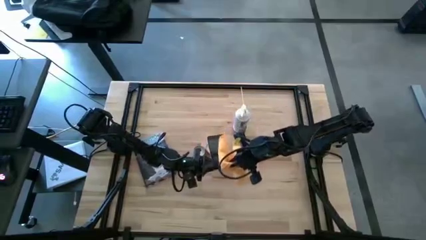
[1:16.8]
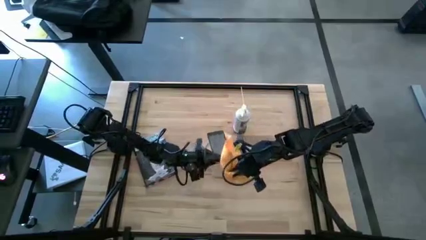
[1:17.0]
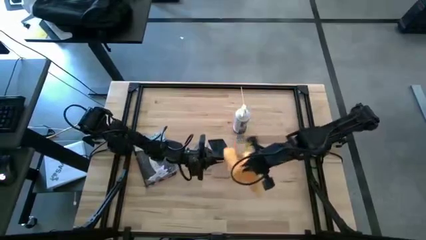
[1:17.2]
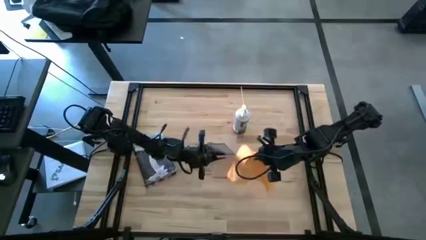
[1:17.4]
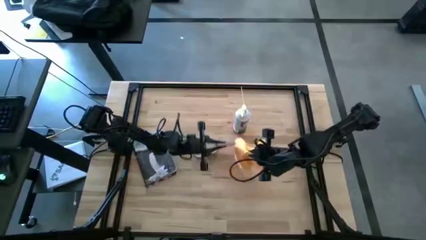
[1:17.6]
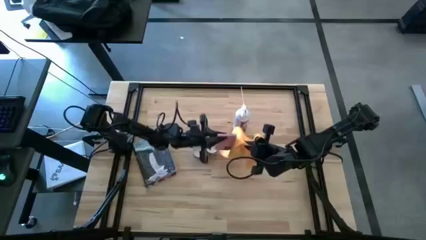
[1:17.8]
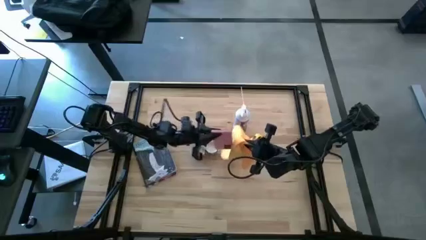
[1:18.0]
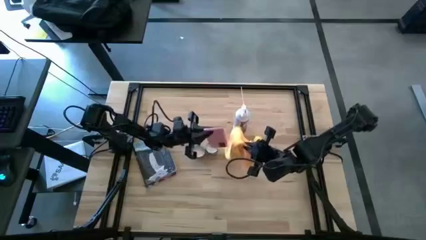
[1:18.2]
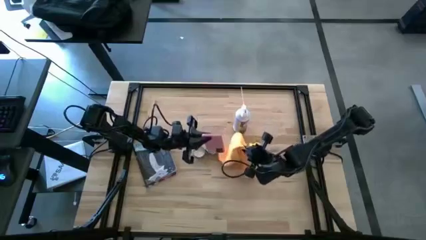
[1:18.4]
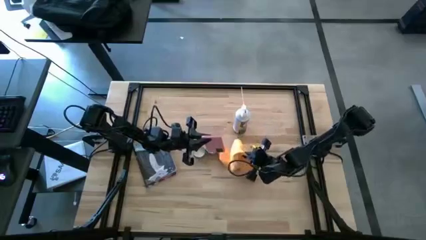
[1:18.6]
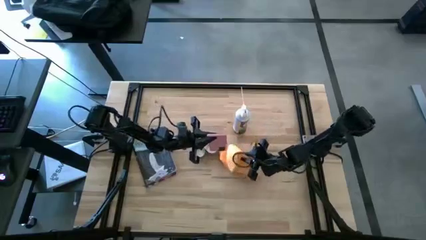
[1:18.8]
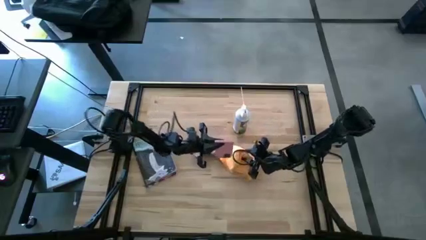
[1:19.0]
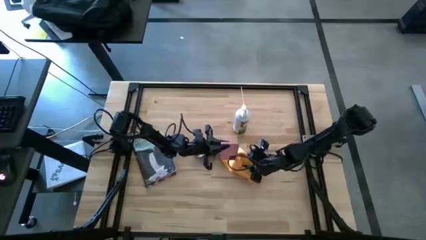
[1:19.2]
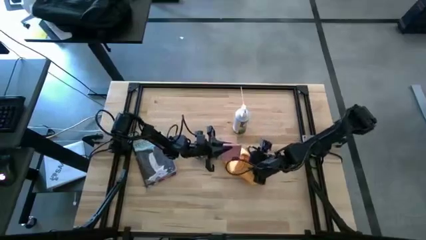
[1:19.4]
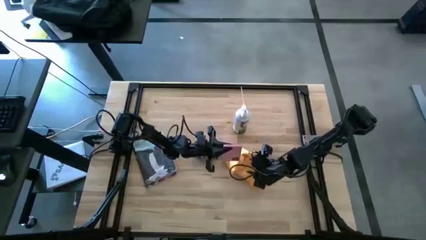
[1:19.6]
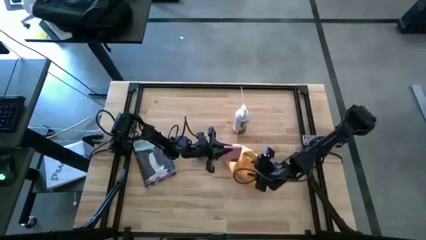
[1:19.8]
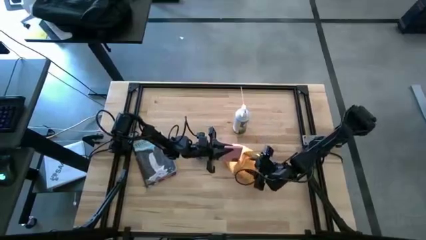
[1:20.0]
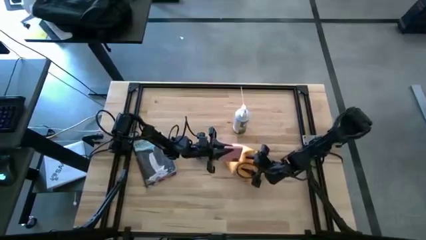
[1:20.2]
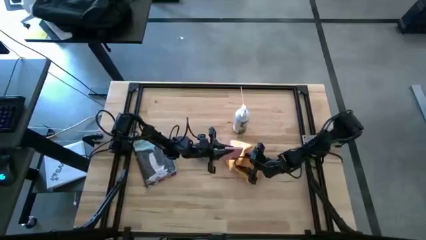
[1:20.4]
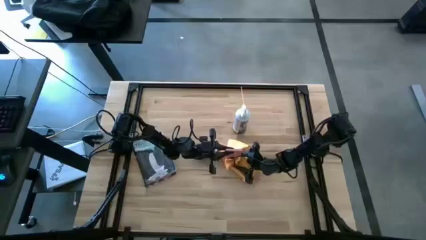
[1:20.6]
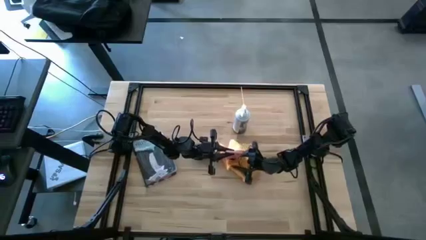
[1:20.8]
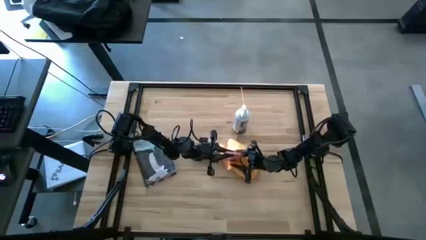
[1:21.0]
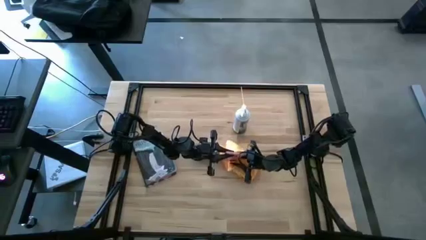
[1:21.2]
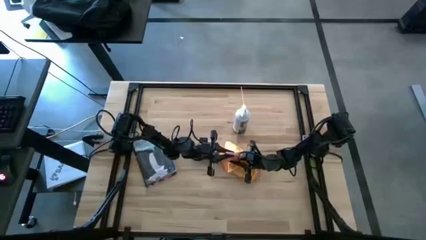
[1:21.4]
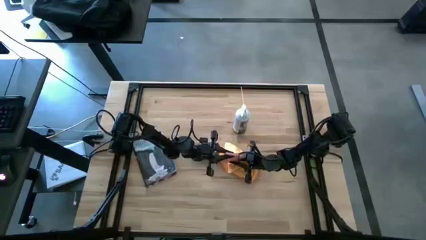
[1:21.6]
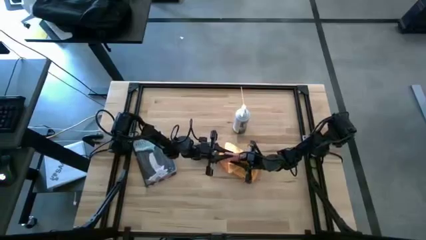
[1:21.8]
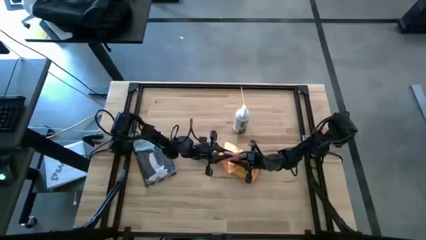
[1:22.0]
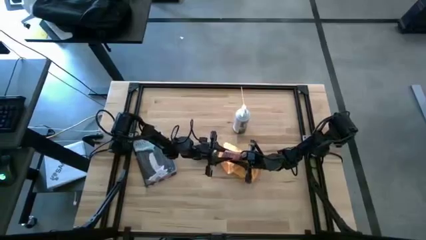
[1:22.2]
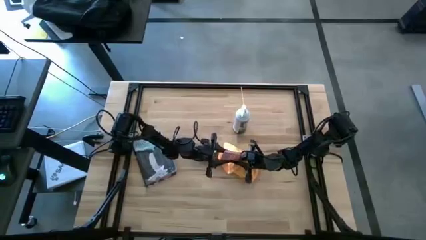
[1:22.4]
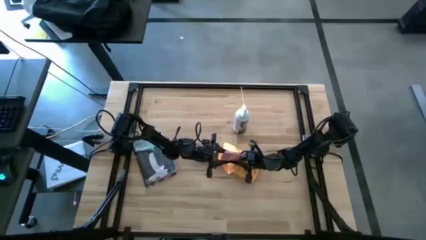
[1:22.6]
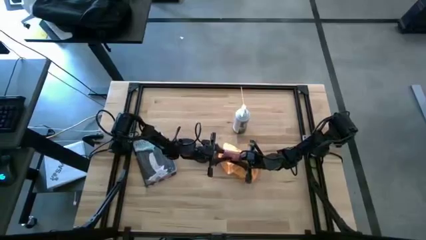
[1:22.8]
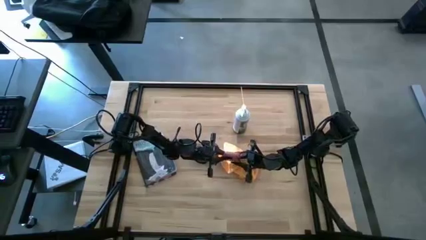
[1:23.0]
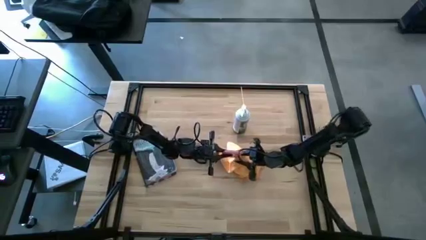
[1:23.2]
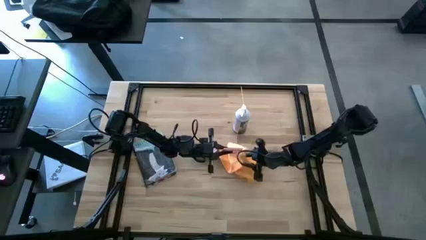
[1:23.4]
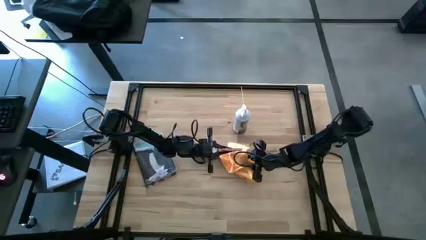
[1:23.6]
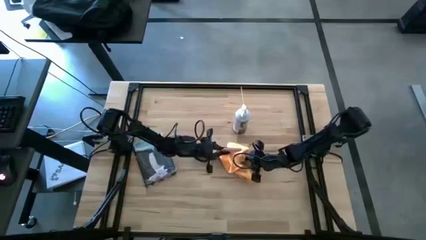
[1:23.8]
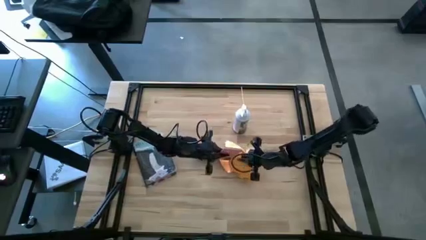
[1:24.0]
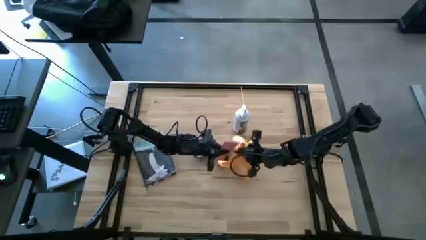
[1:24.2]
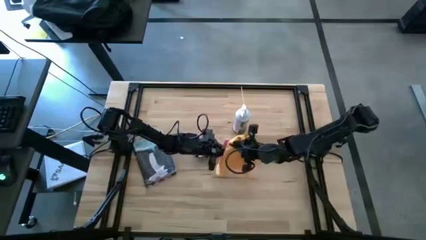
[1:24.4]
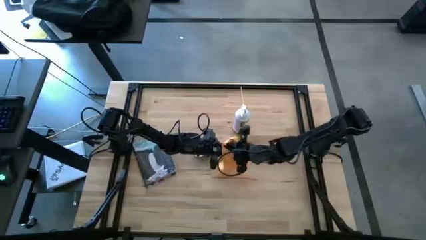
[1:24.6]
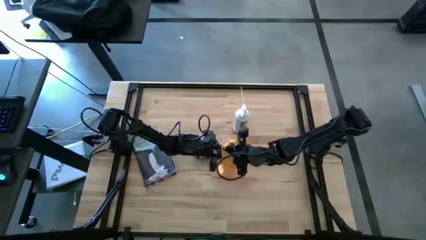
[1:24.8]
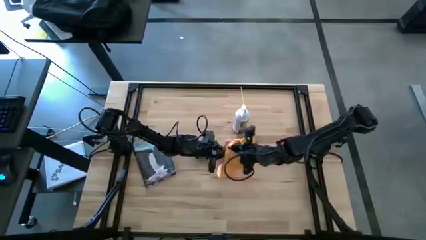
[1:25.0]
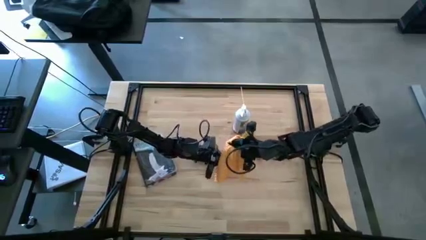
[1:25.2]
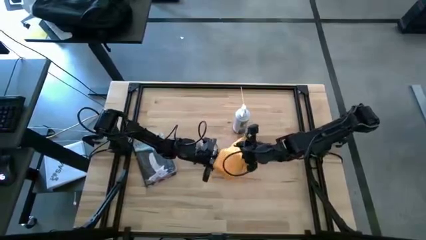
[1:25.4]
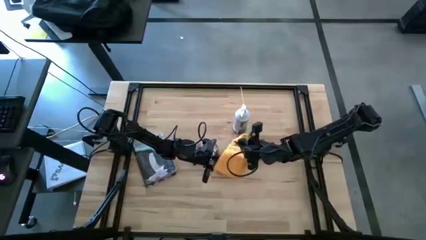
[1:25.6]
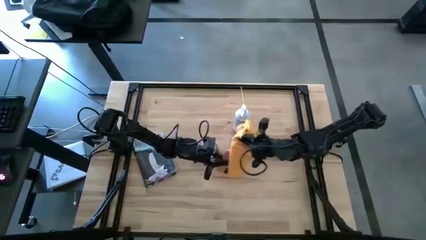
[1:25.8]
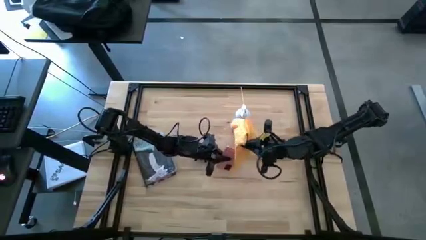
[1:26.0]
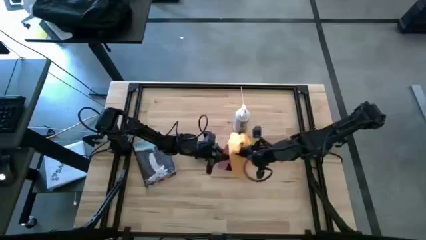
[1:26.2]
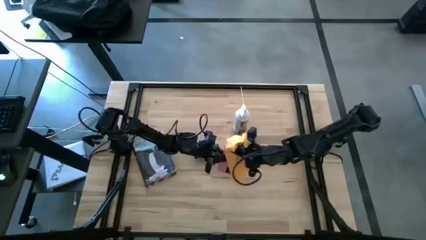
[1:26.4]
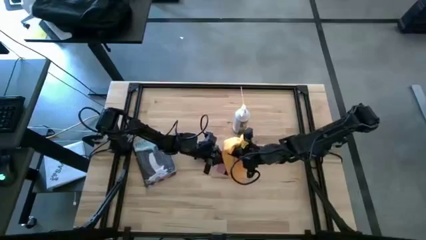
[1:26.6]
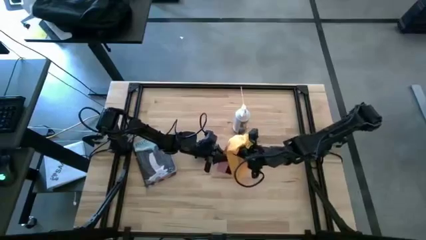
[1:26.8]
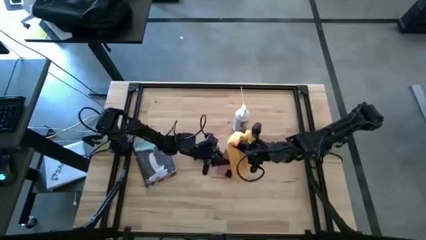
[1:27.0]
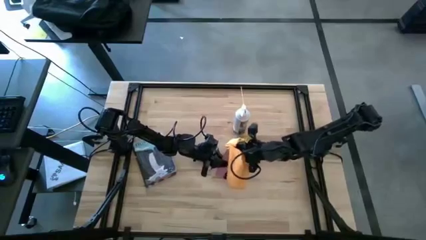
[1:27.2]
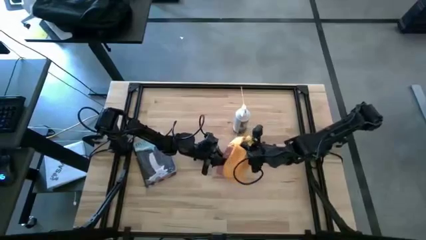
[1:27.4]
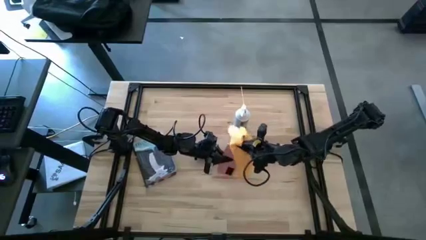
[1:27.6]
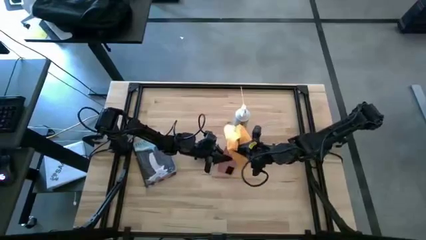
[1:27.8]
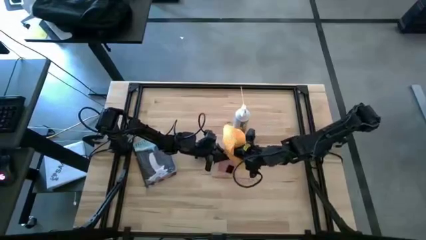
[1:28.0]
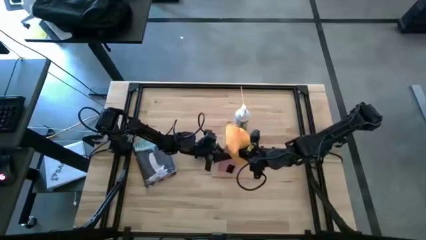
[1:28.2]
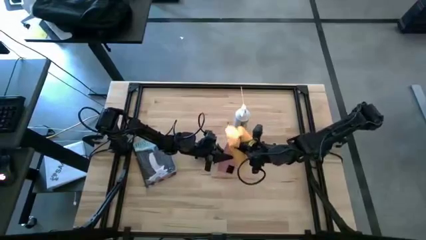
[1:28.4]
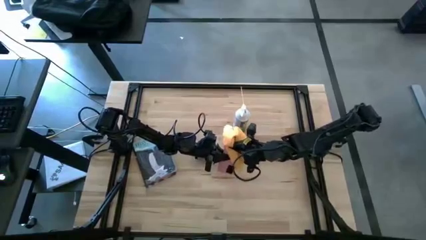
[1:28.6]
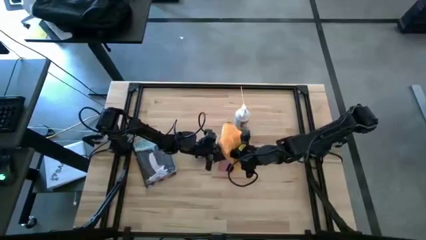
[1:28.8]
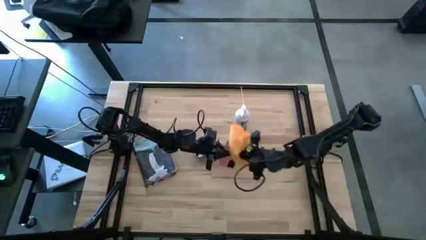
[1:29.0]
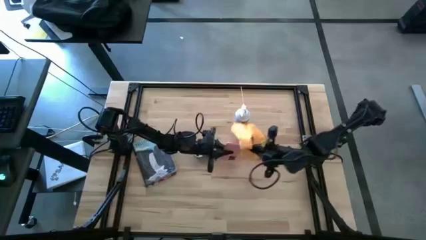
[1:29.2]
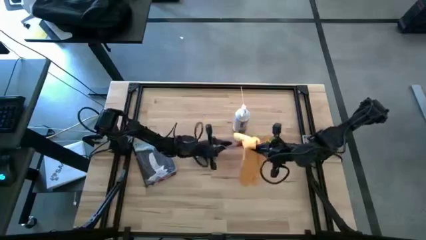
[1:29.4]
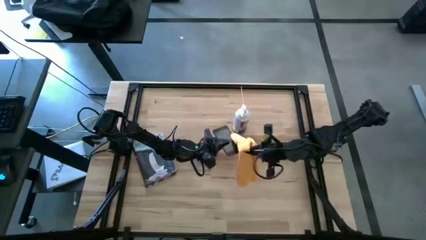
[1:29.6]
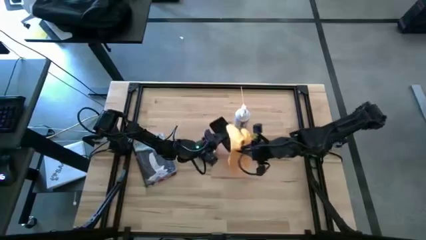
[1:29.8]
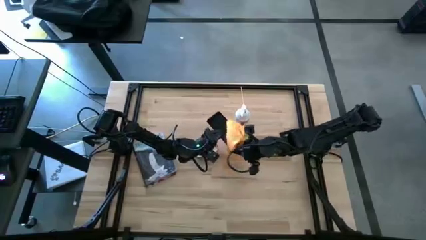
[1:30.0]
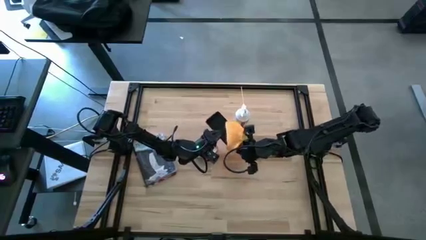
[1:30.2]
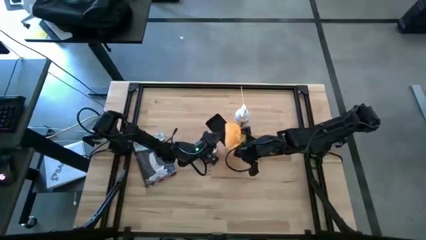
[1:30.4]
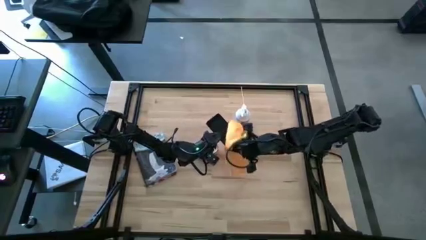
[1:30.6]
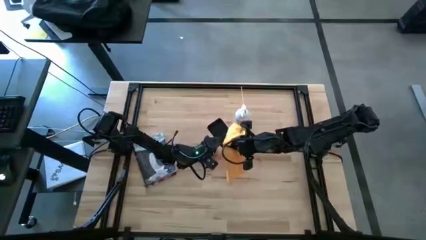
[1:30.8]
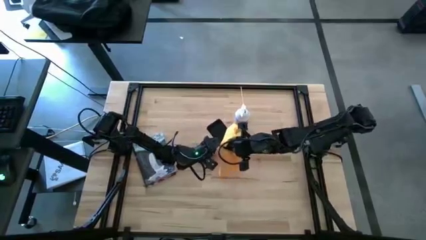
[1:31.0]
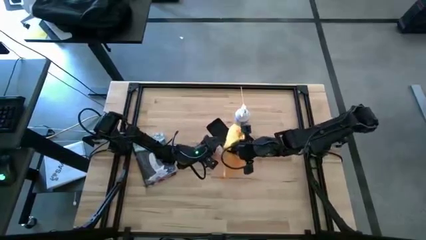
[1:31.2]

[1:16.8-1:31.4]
Task: Apply microfiber cloth
Wipe the cellphone with the microfiber cloth
